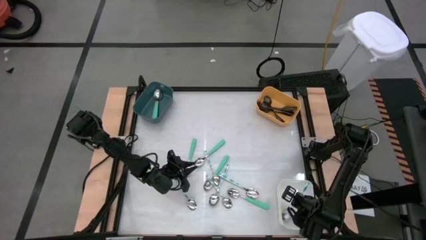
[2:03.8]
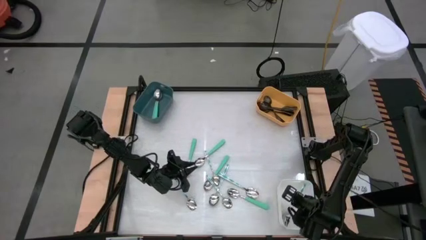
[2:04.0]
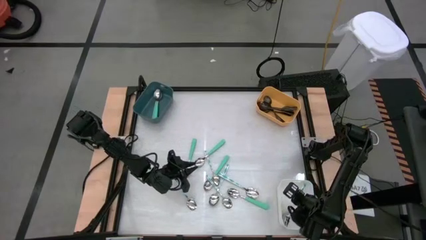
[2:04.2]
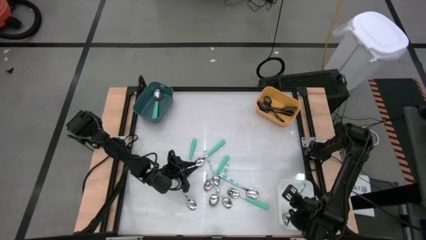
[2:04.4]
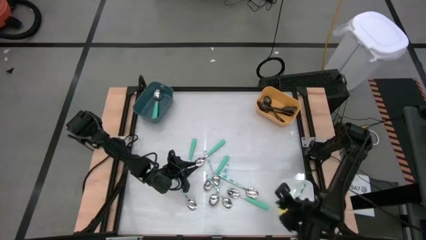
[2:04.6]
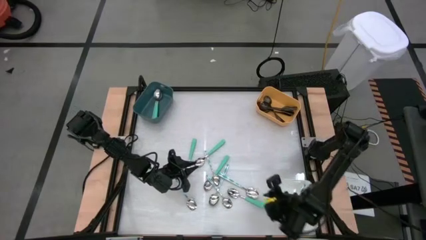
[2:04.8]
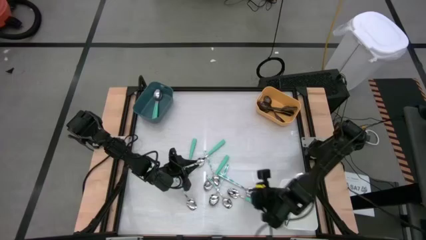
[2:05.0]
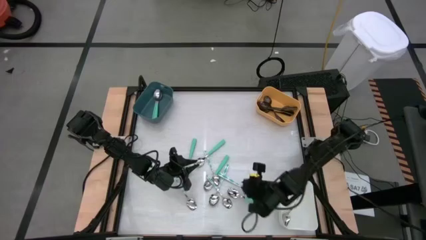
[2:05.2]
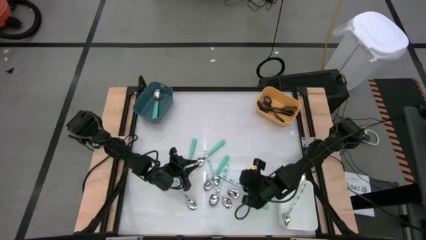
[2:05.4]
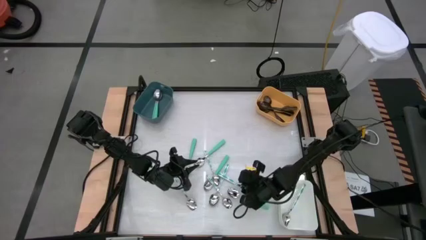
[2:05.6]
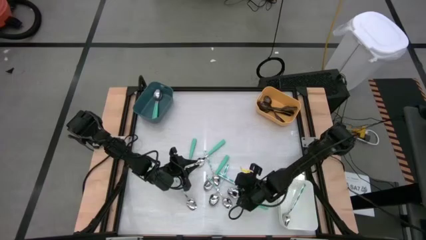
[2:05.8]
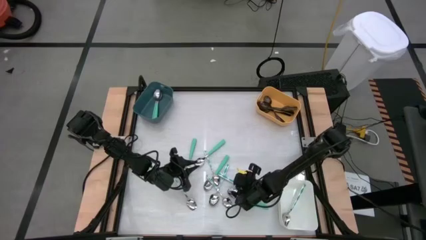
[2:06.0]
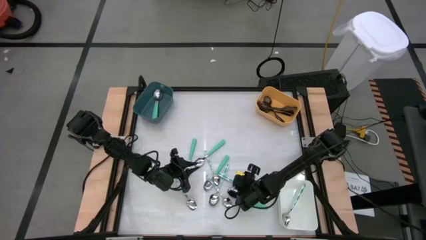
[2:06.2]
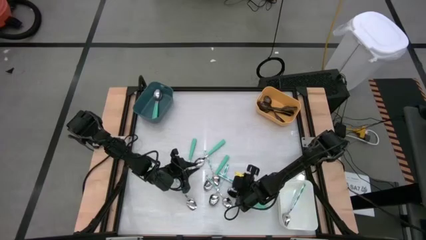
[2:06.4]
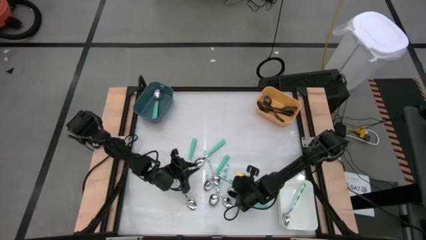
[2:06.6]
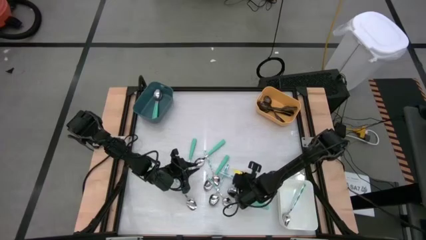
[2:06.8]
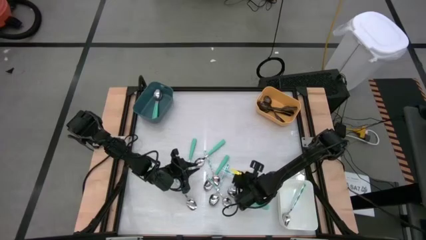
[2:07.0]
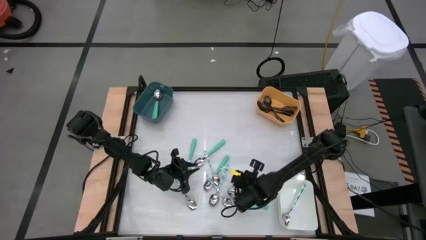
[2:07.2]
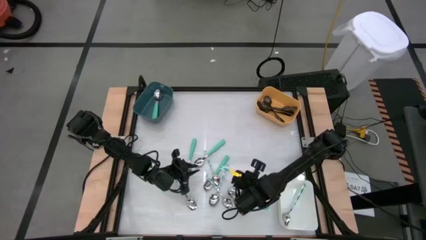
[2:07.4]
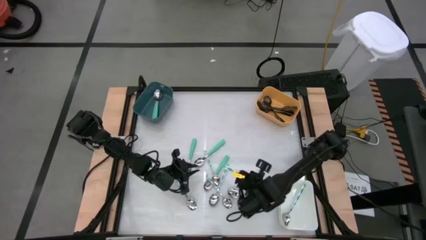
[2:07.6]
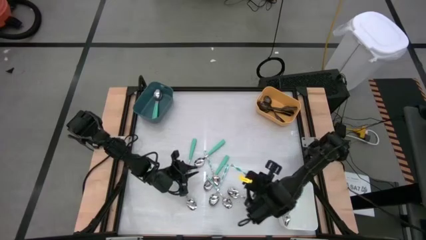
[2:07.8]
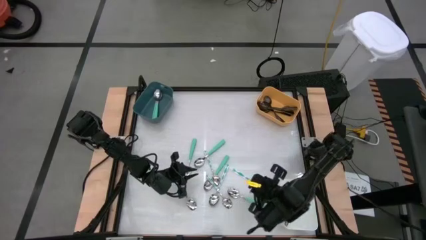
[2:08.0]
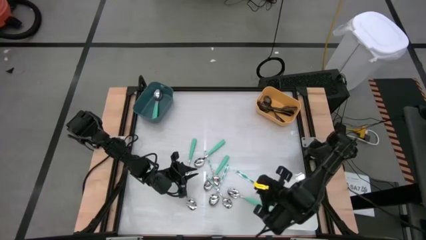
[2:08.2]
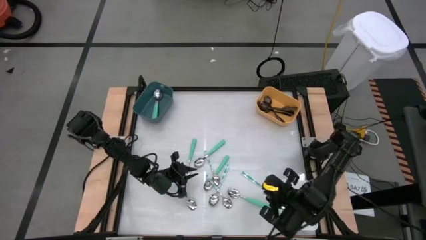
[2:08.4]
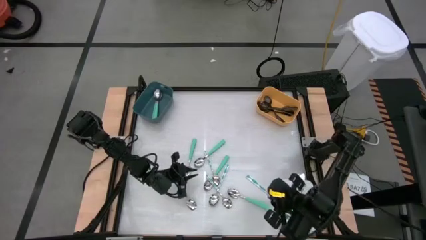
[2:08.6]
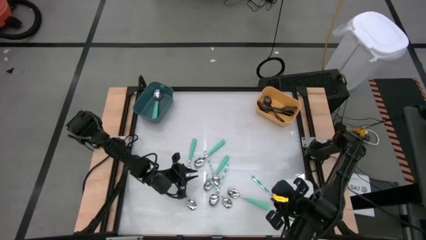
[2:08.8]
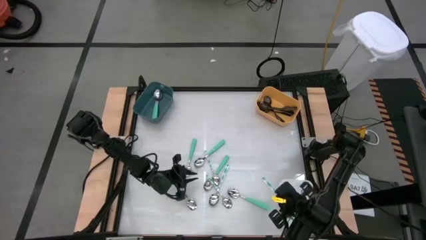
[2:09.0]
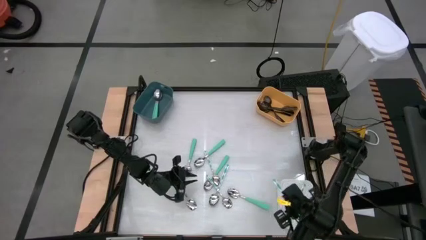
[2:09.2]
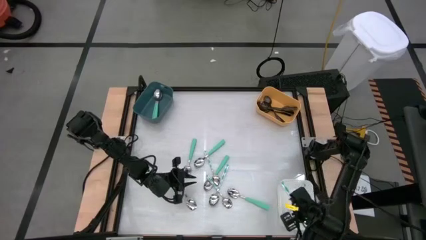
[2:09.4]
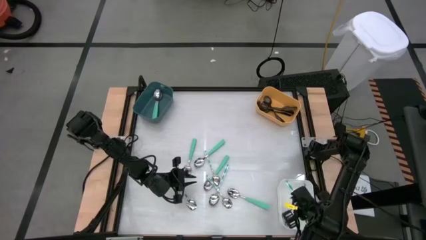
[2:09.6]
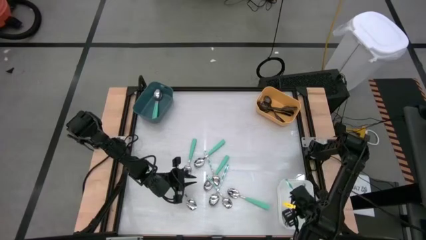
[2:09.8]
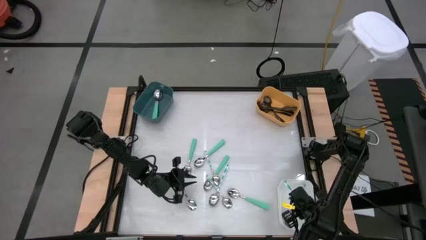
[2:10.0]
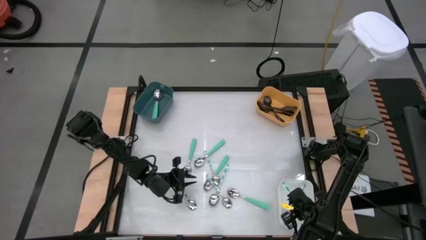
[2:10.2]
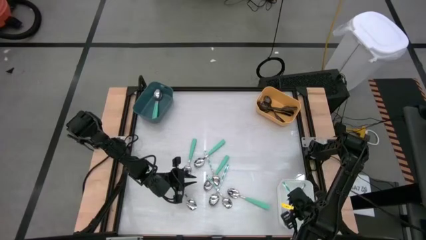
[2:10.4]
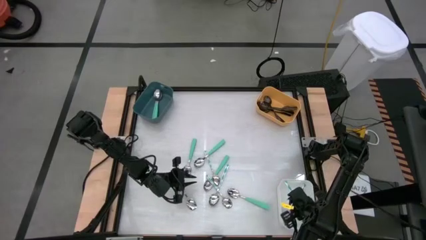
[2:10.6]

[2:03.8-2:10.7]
Task: Sort silverware by color (type)
Put the patterned green spoon into the white bin

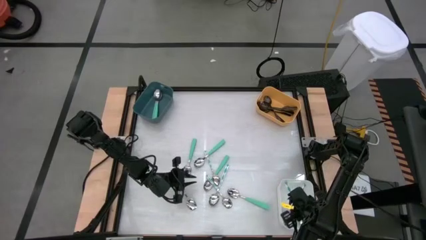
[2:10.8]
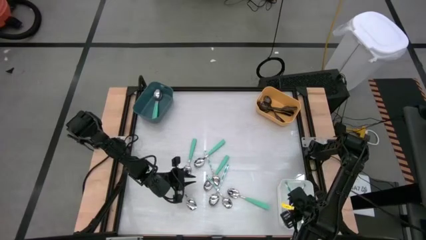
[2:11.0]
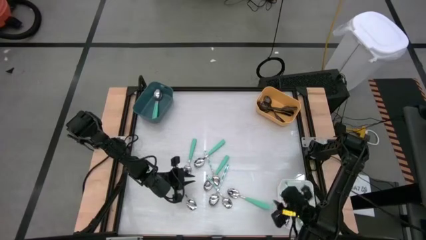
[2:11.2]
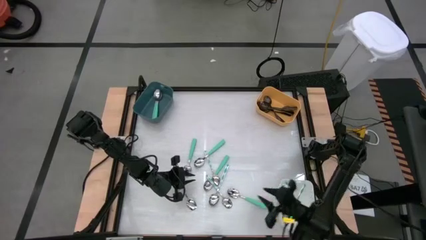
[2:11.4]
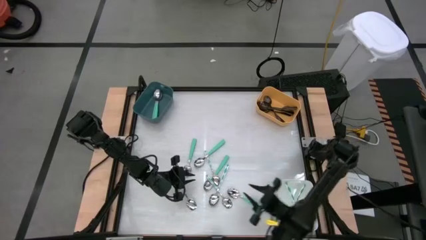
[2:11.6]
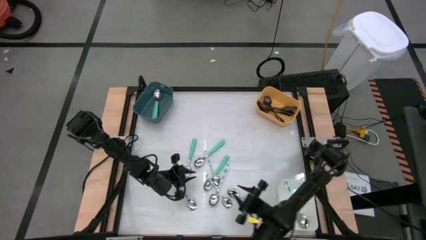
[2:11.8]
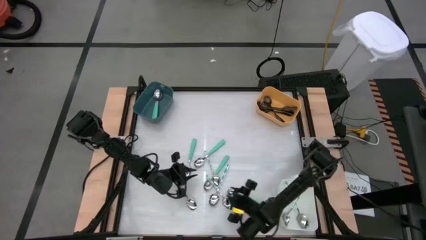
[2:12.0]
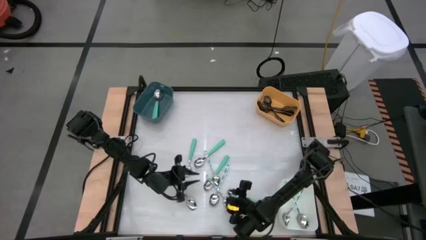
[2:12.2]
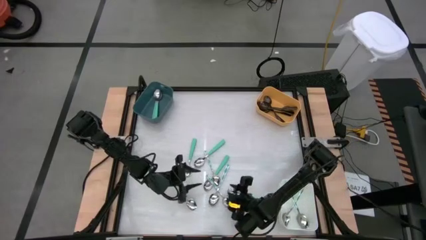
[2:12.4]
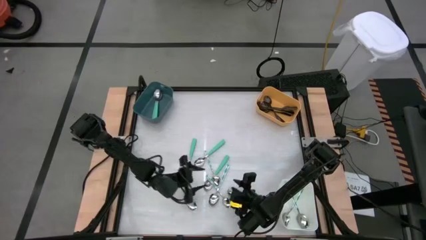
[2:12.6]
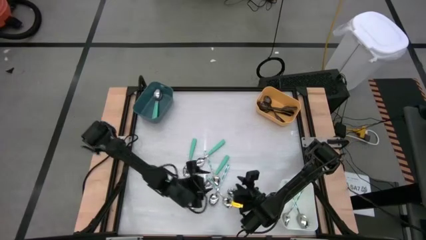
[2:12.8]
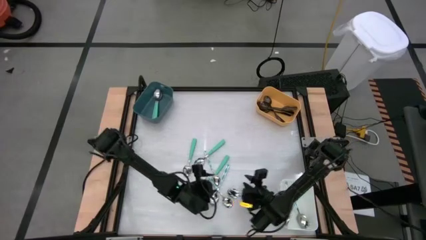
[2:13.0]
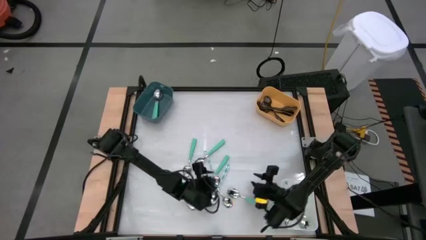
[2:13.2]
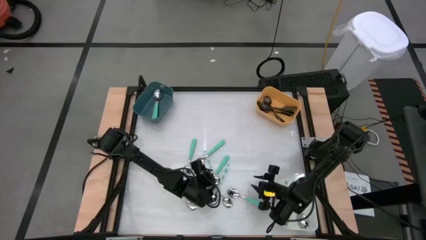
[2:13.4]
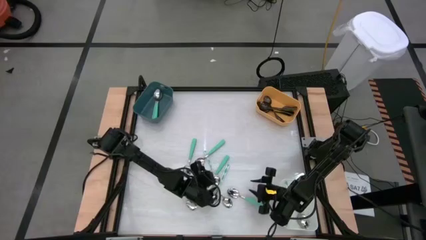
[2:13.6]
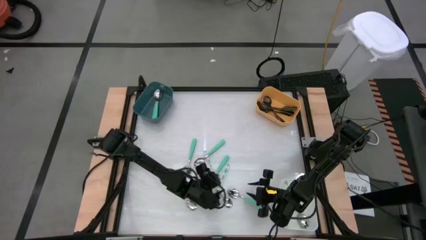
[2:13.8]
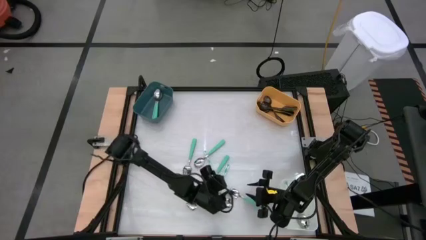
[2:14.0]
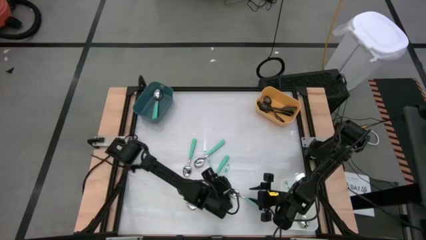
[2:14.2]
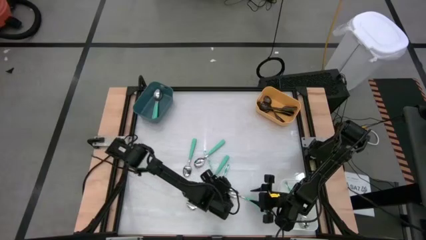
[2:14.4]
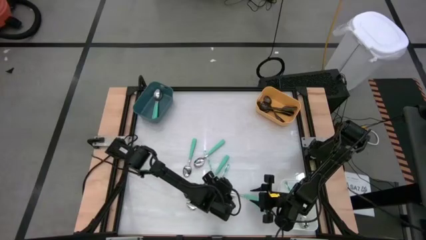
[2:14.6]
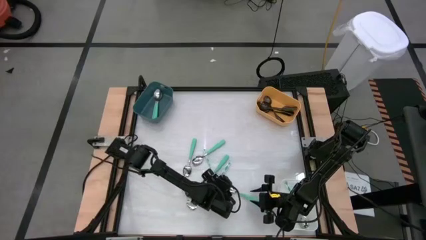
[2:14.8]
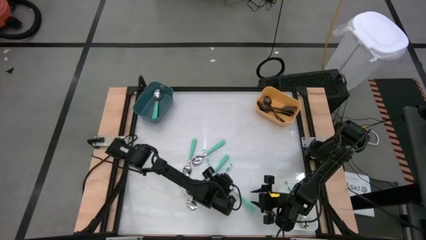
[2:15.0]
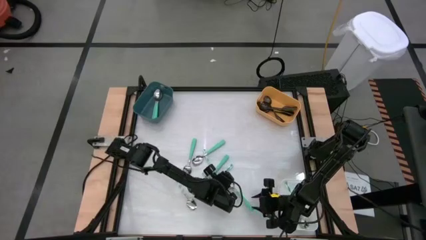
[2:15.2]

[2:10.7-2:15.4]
Put the green spoon into the blue bin

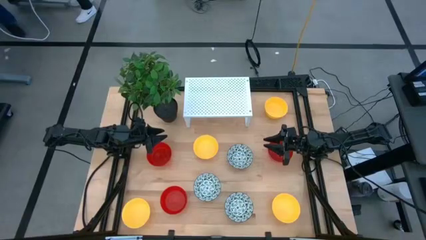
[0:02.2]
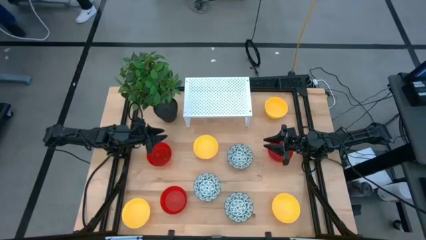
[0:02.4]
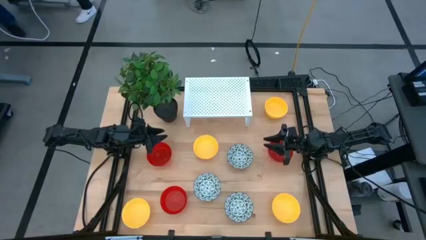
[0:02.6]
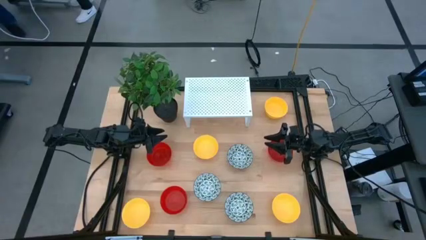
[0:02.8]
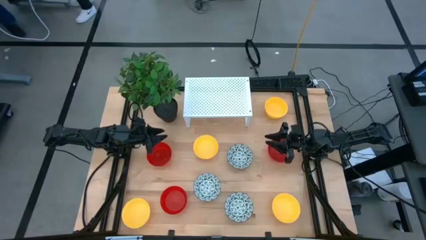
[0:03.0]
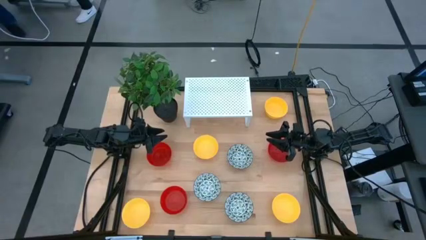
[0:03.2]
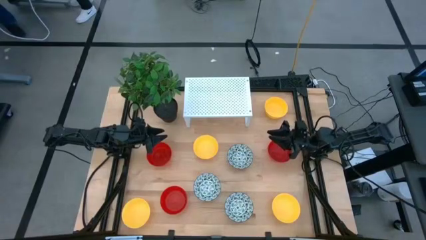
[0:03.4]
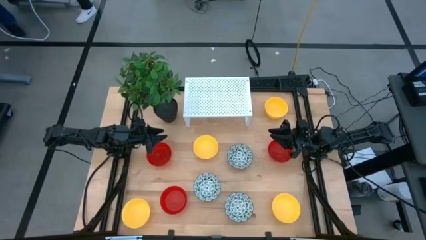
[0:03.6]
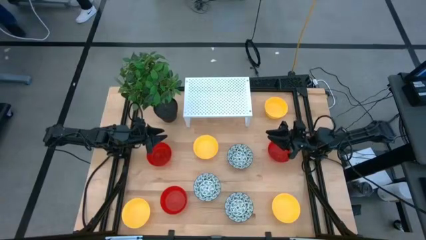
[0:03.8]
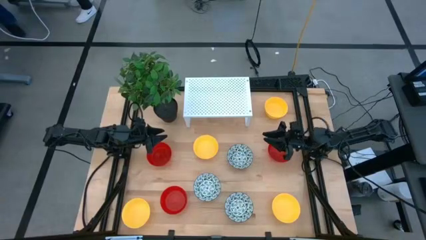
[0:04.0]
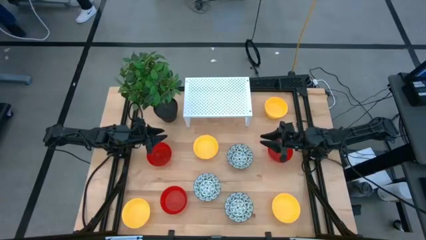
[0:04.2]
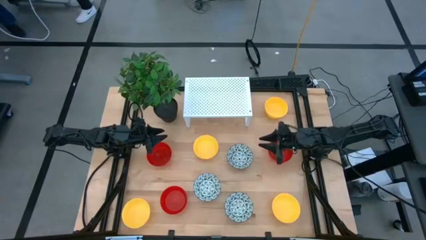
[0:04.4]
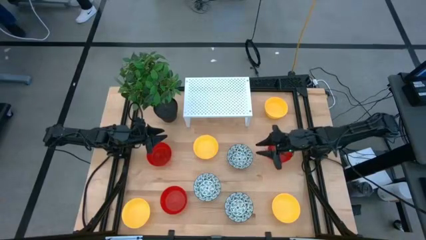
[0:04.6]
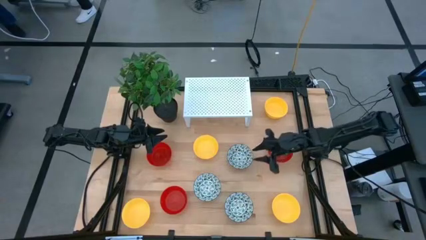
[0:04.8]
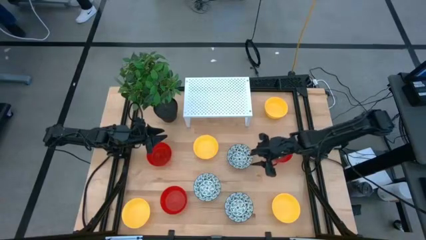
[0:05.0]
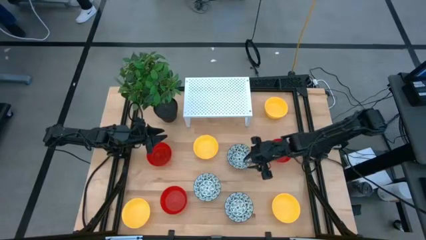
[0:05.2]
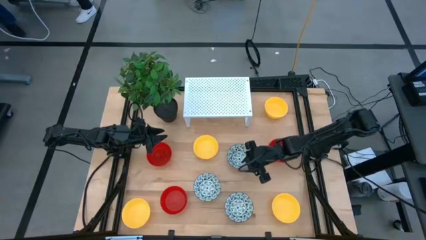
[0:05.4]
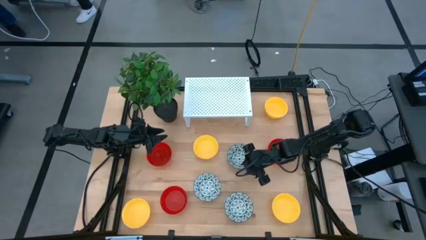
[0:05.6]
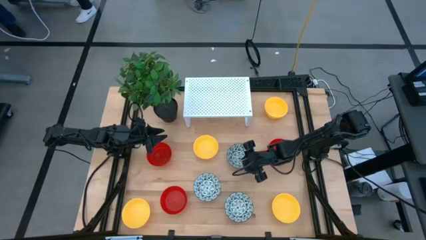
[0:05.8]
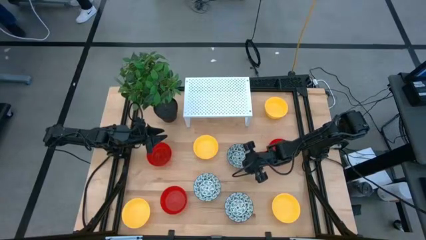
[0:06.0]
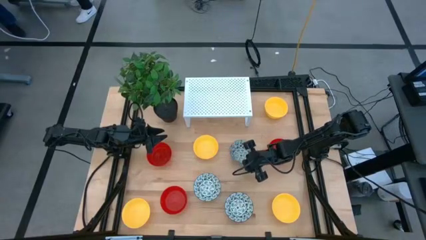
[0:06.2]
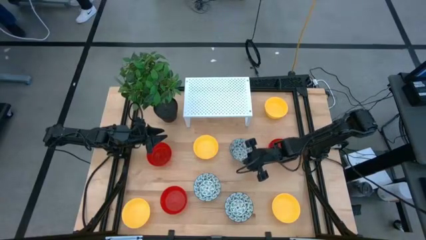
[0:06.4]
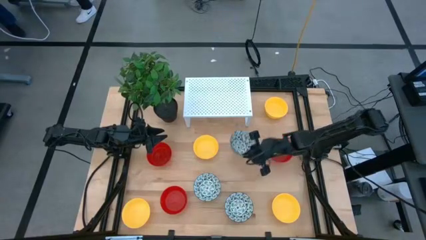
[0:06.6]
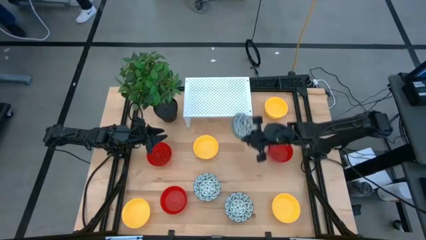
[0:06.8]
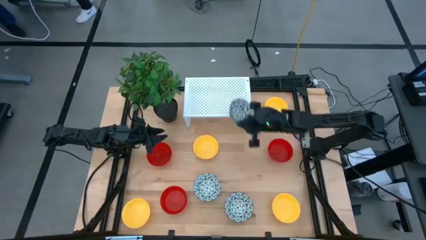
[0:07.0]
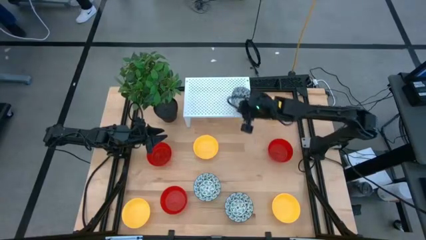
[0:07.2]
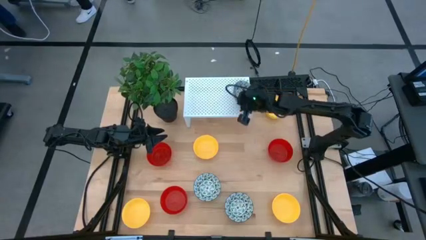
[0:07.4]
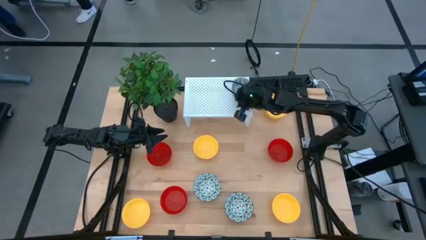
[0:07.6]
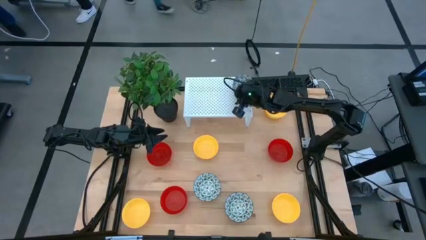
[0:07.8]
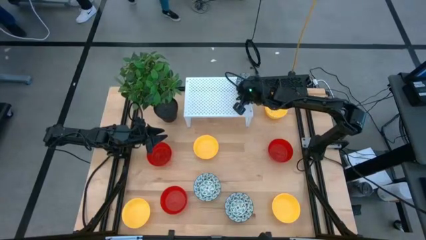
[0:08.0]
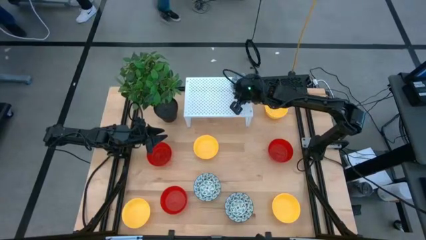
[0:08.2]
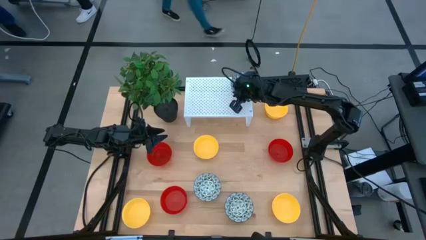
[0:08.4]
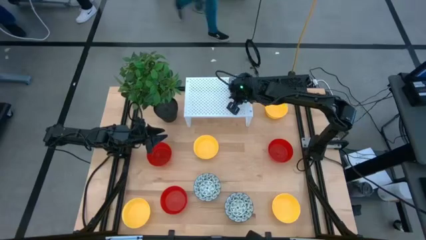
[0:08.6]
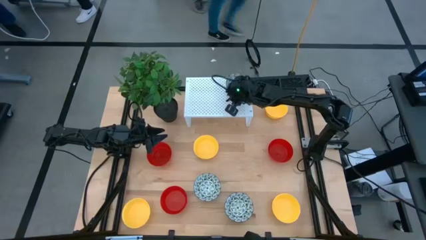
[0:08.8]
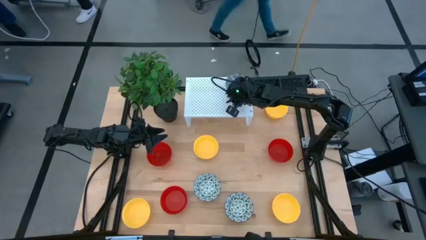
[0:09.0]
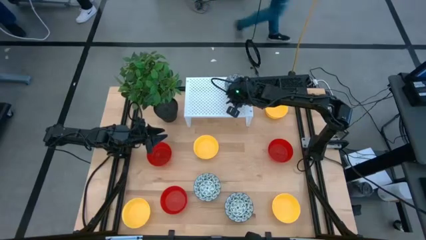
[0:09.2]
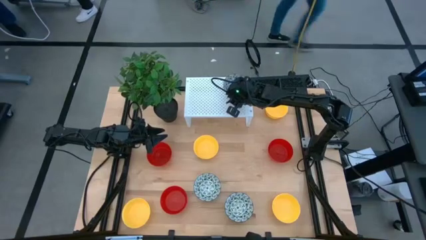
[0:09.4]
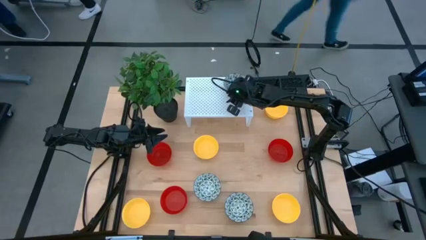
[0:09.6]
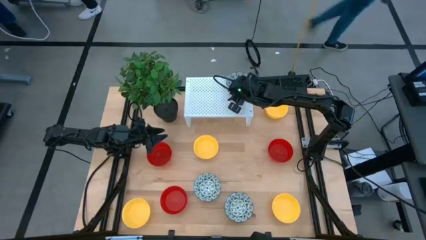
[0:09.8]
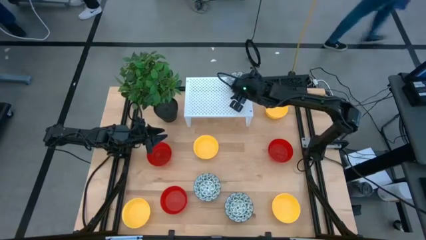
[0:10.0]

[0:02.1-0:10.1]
Task: Pick & Place Mini bowls
Put the blue patterned bowl on the shelf
